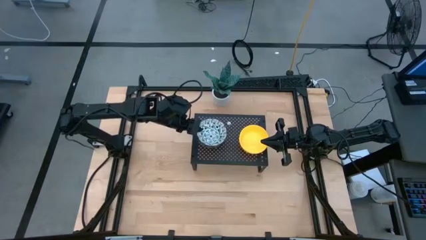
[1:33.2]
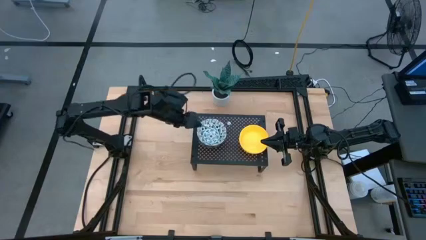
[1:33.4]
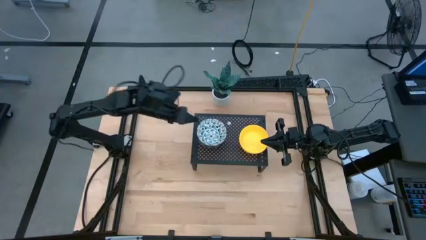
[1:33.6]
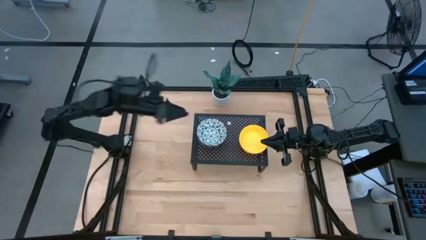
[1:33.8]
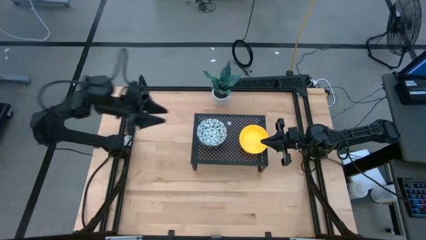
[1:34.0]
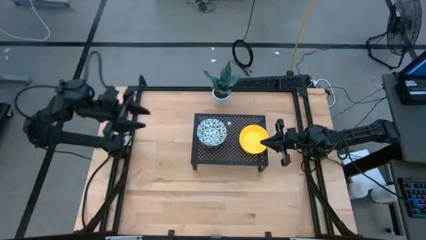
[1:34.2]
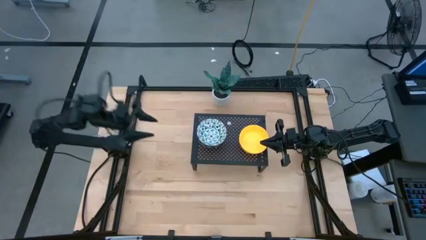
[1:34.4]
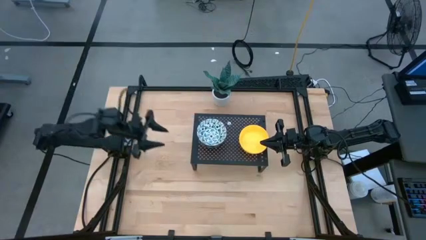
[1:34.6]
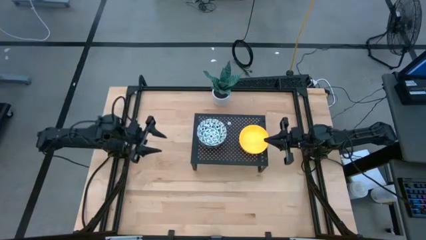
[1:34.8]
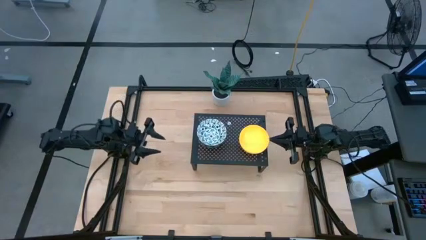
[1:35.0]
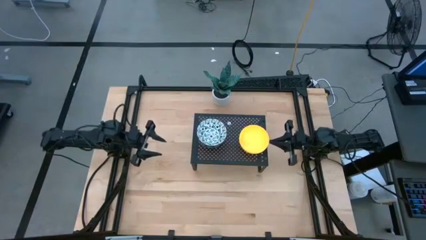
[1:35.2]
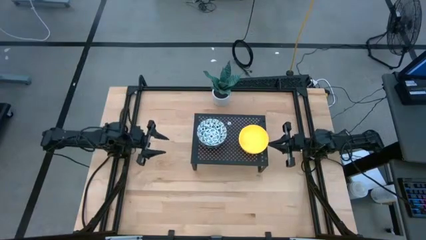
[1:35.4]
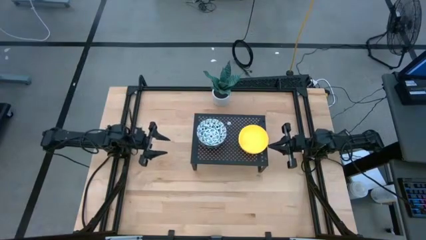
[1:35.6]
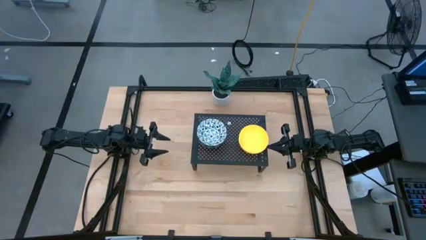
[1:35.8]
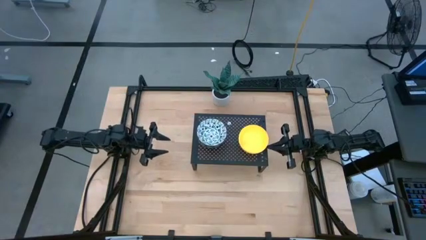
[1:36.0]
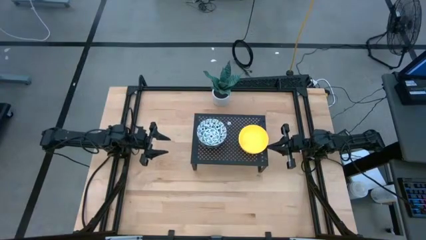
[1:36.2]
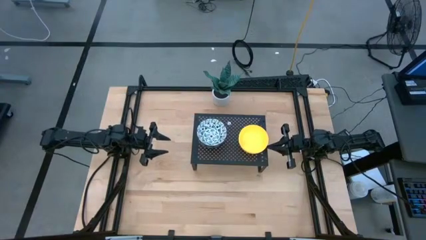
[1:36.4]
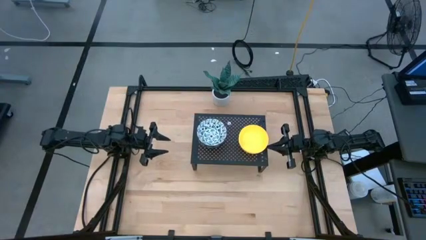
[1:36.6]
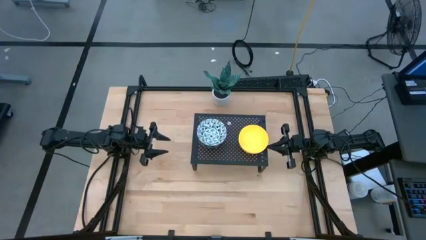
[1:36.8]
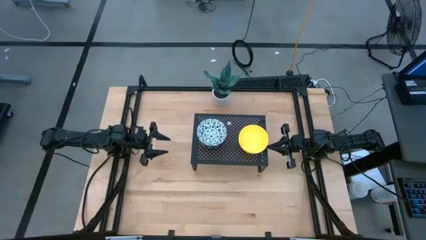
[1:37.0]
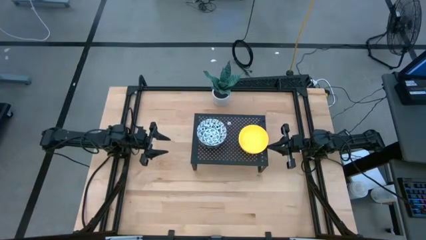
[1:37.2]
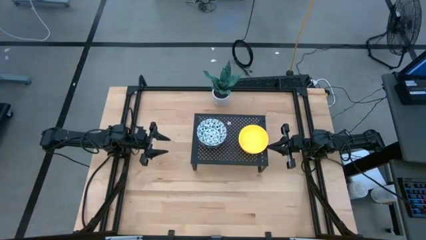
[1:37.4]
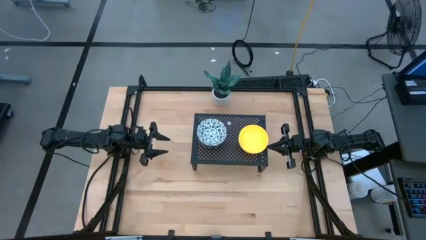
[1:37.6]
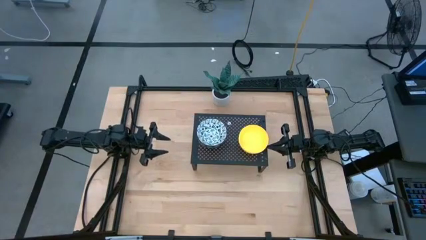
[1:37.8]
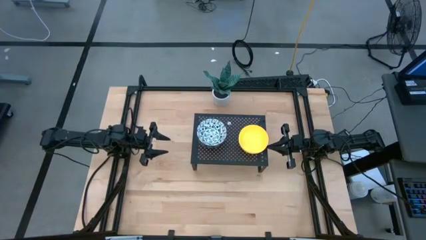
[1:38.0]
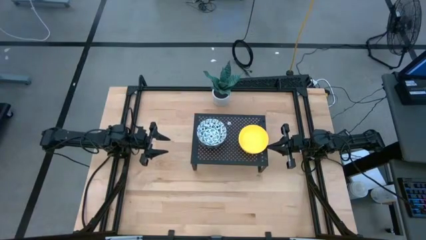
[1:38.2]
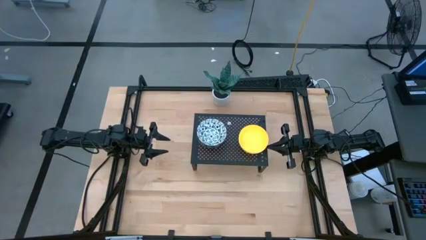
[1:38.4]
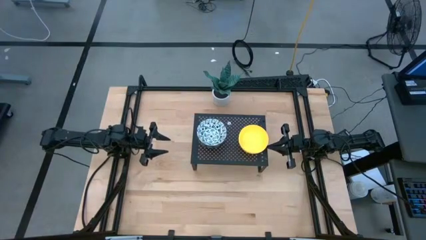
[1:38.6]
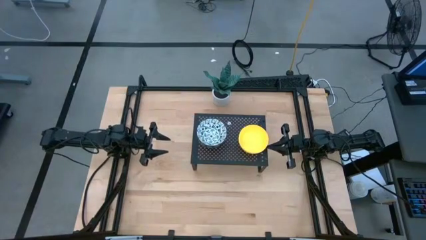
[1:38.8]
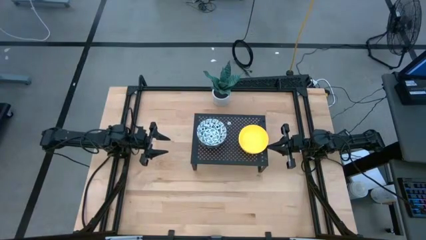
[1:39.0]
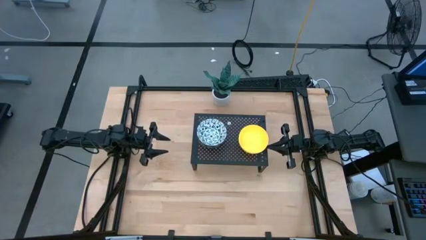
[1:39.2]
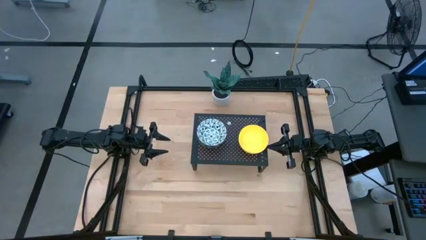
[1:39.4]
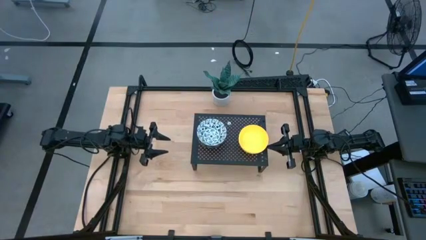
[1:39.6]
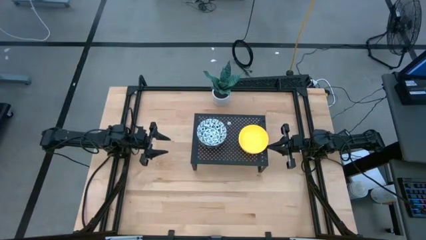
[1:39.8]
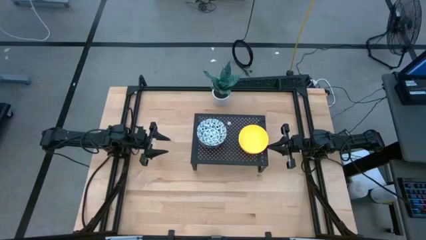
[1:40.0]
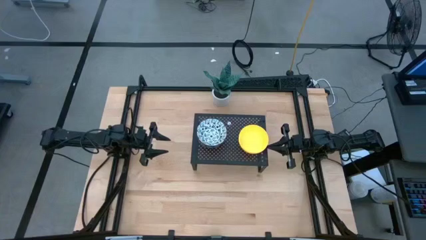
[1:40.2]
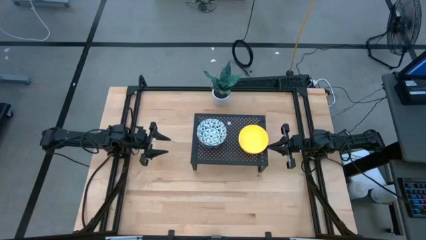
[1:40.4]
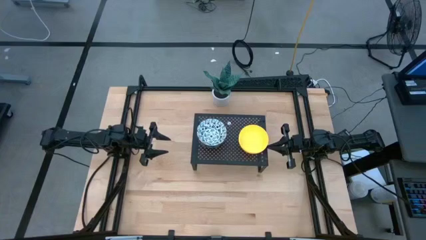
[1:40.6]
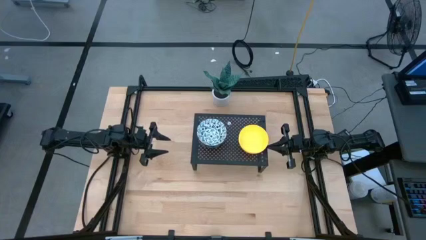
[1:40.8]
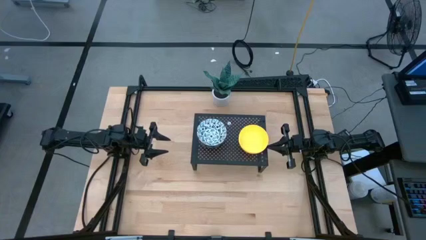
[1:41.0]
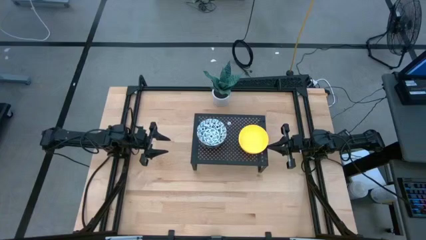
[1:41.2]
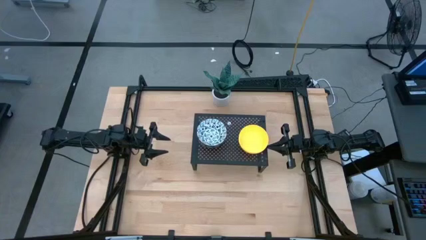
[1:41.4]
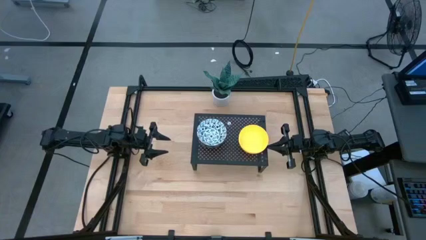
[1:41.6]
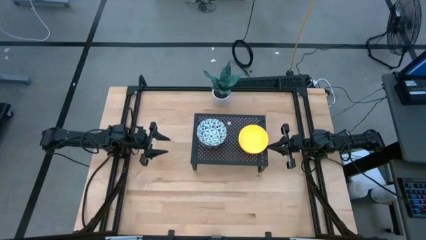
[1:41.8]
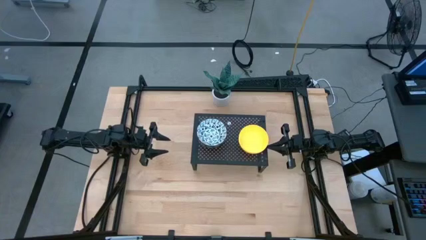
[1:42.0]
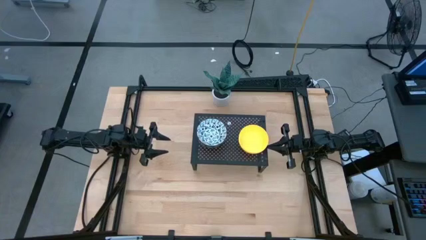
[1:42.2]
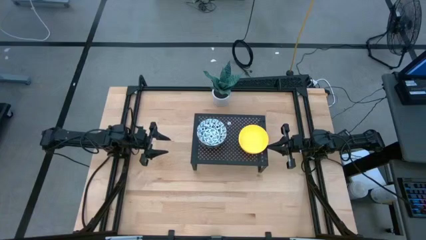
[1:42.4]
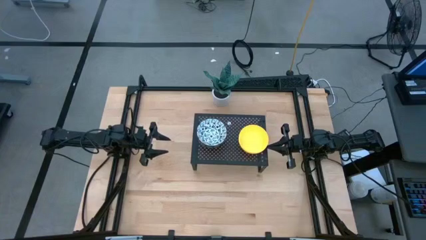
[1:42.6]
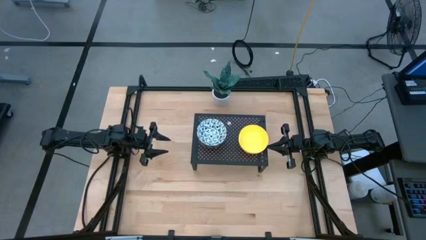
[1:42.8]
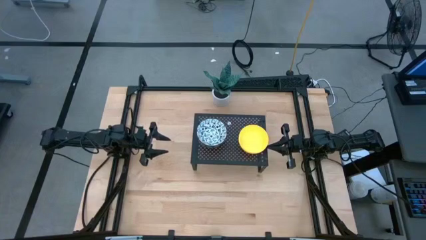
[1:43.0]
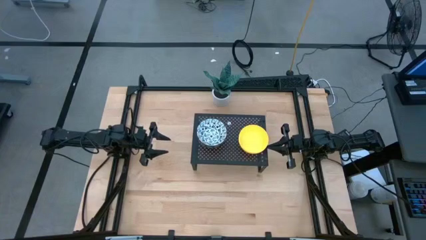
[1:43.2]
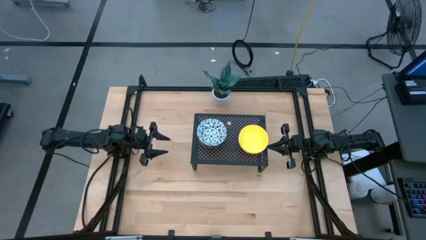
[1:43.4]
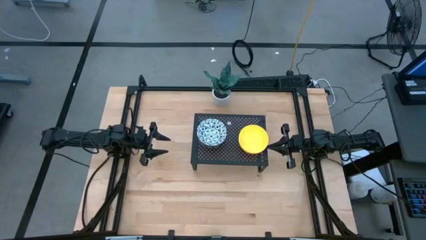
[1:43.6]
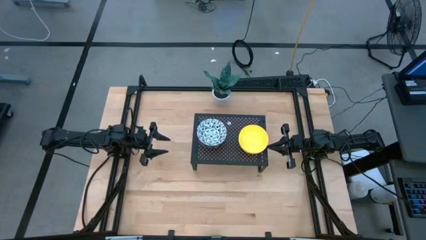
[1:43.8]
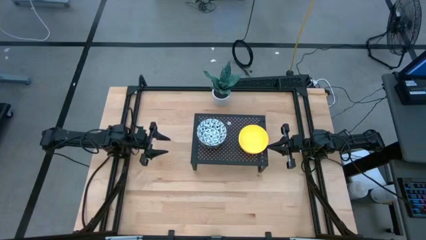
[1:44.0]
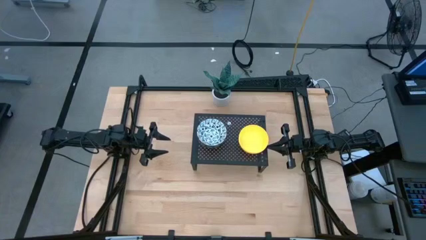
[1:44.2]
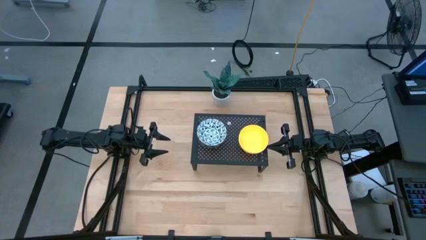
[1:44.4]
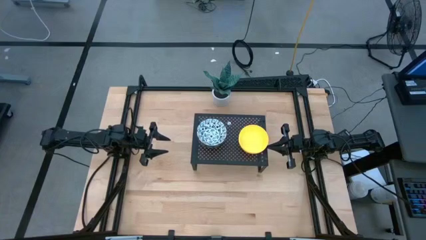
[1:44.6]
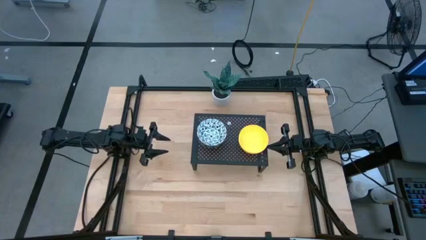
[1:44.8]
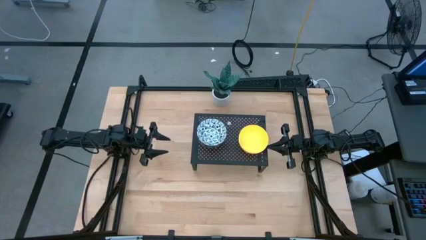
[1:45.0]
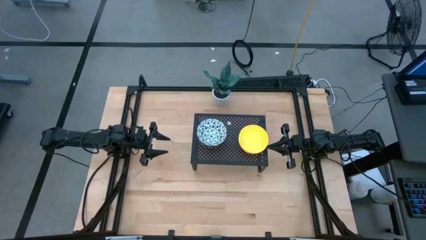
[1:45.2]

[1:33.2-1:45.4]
Task: Pick & Place Mini bowls
Return to Home Position

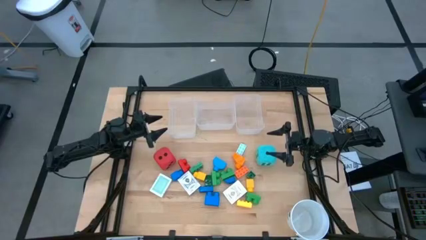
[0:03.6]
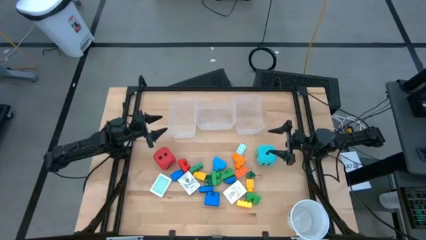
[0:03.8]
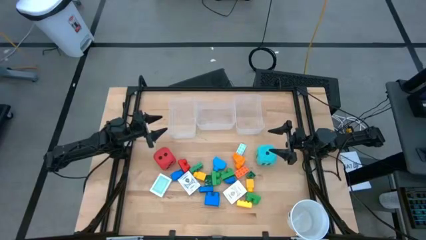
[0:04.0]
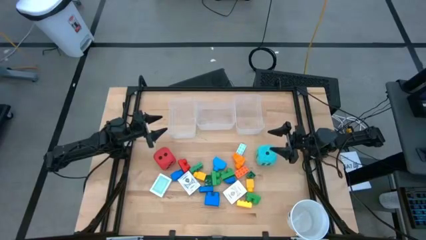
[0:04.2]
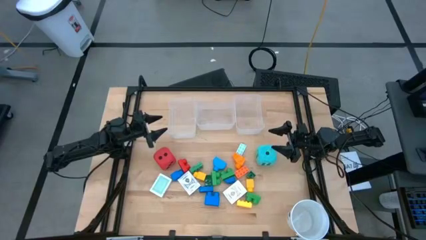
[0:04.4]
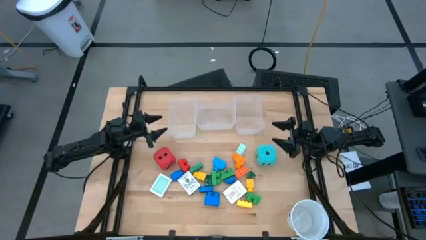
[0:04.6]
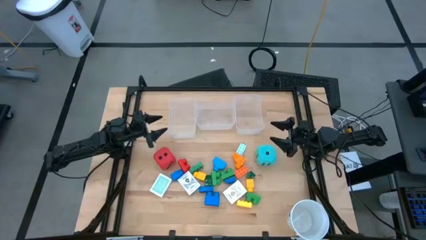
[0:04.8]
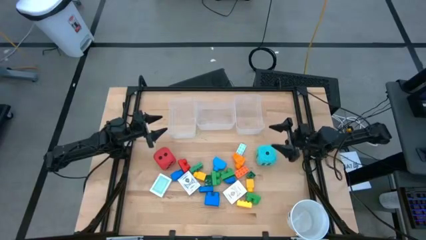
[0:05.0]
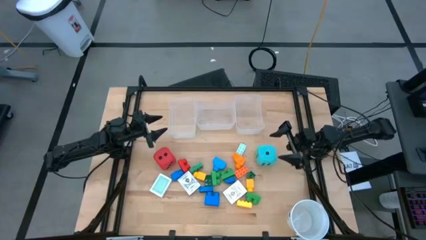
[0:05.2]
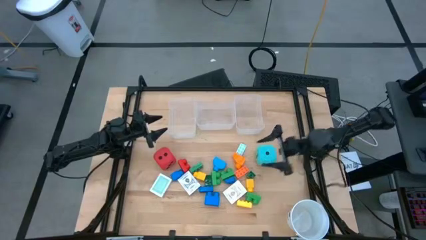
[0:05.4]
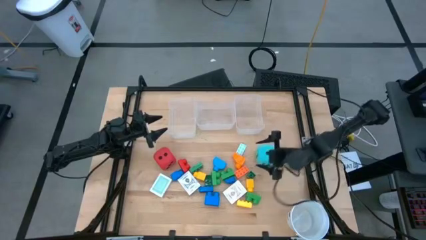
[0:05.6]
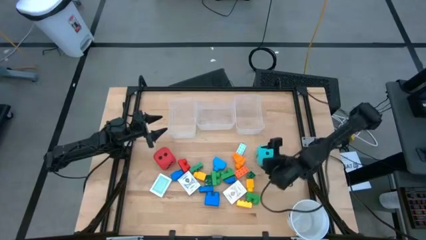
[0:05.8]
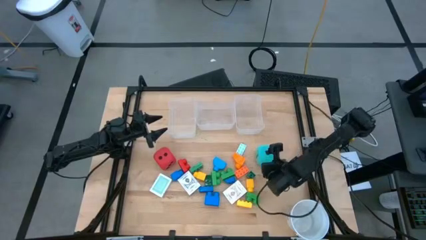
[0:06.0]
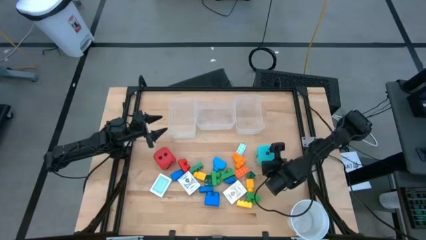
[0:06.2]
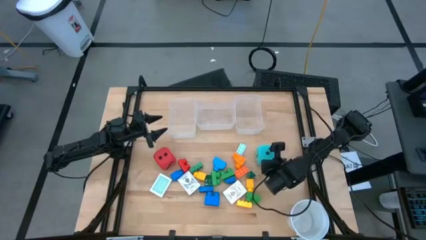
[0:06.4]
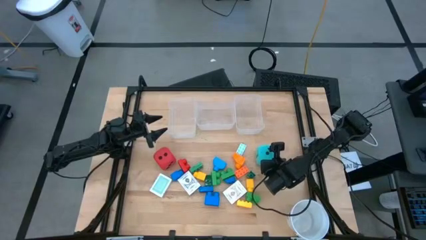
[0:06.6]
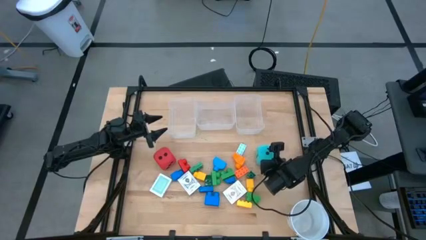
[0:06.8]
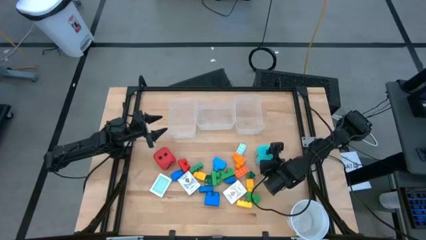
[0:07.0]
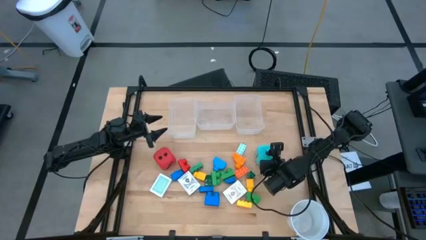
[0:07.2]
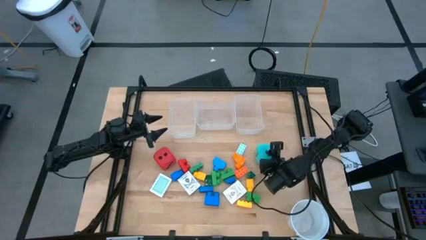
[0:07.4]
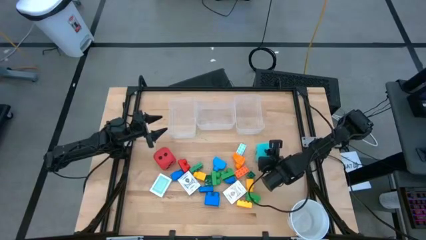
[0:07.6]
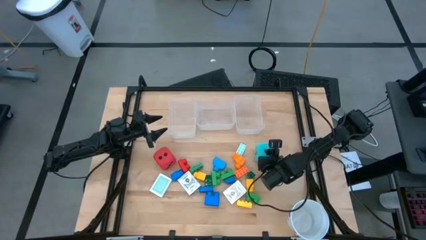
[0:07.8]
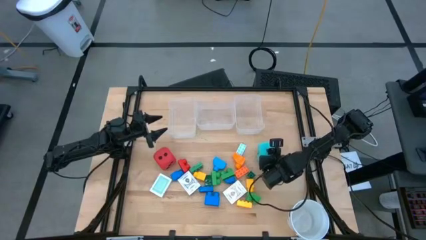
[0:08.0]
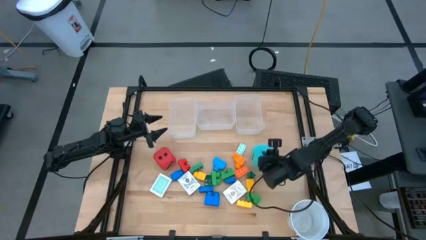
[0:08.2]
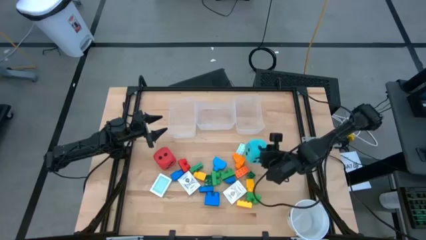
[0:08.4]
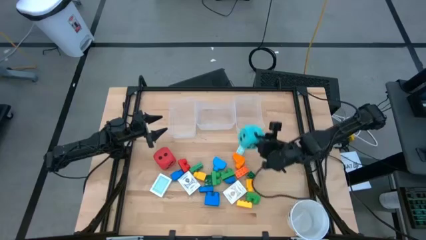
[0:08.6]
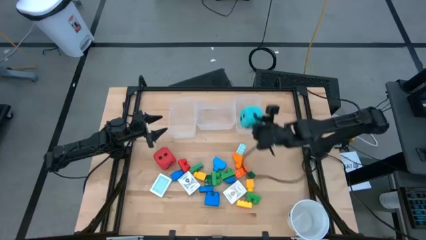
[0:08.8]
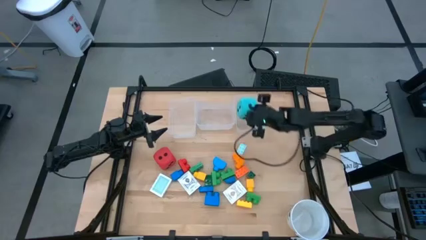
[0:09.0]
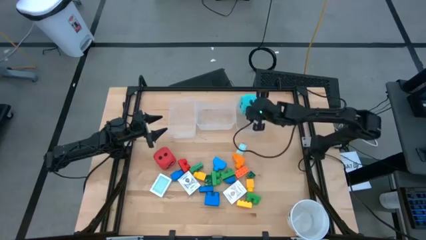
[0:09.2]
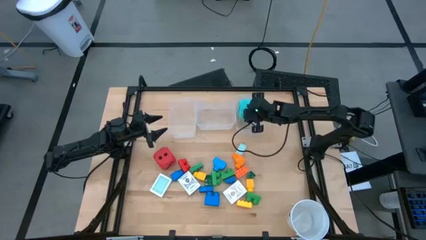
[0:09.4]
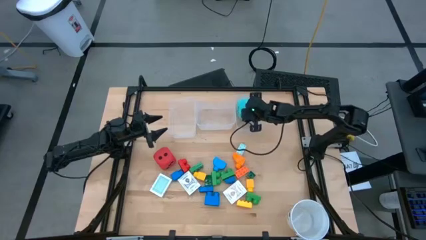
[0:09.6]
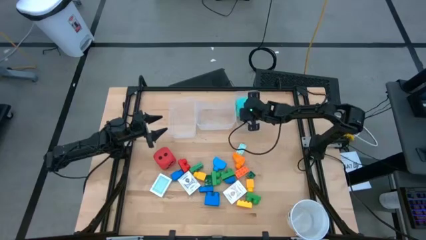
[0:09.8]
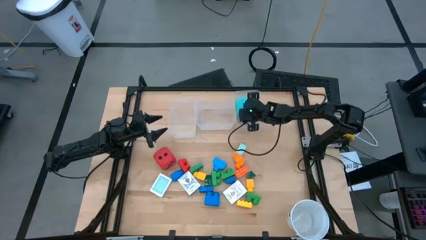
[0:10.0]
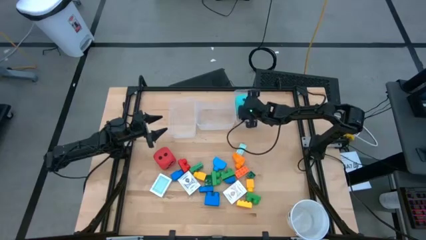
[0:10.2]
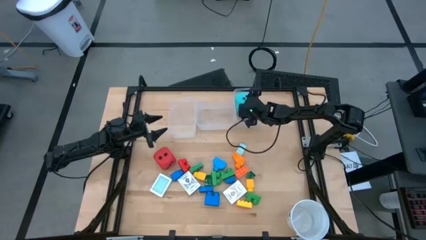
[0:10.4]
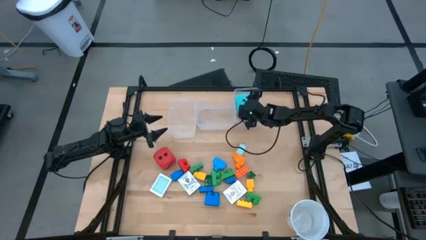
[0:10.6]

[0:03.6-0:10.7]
Task: Pick & Place Toys
Put the blue dice into the right transparent bin
